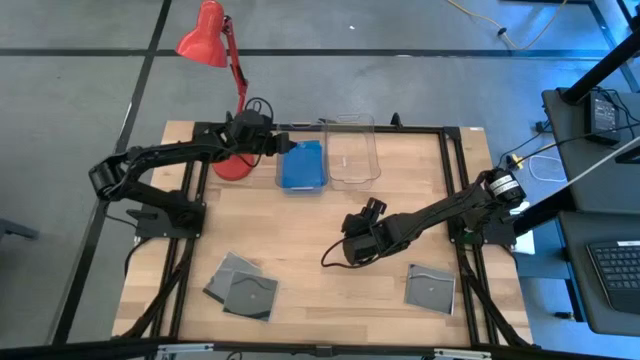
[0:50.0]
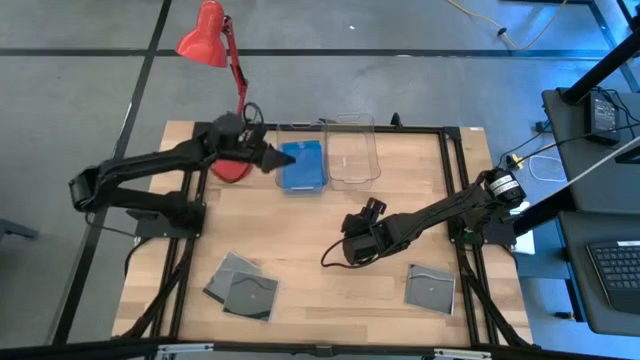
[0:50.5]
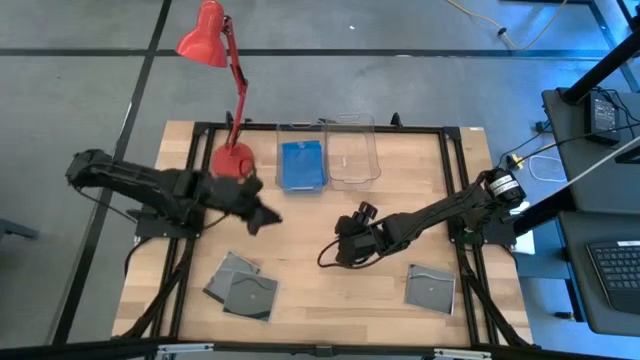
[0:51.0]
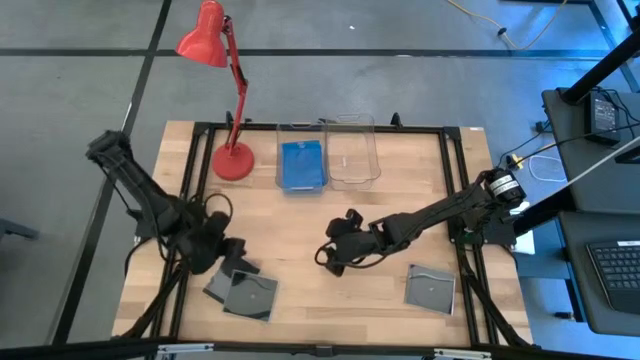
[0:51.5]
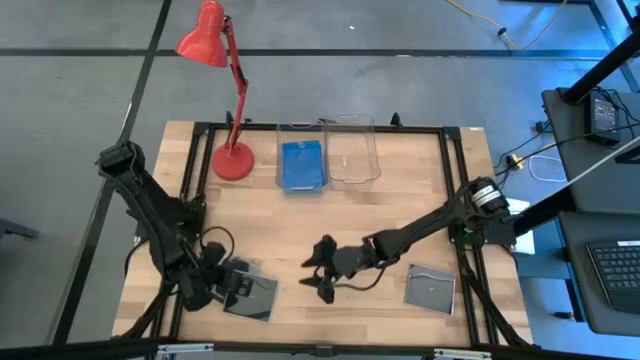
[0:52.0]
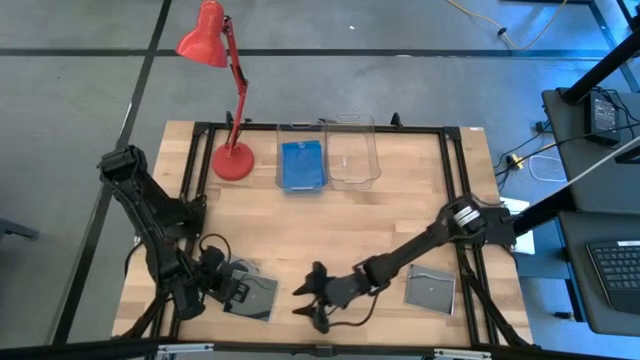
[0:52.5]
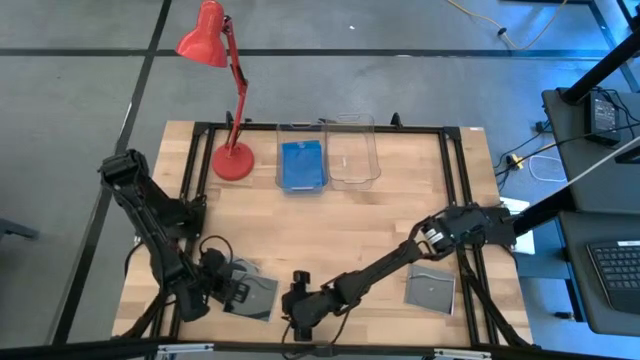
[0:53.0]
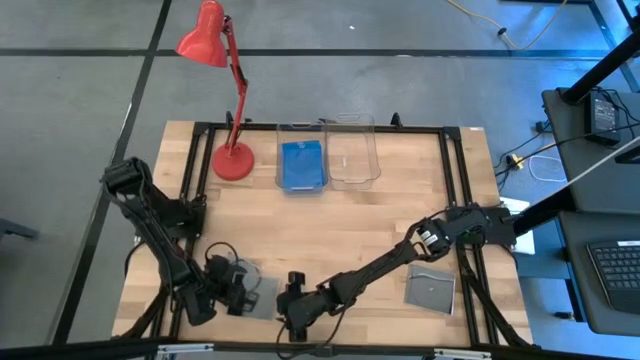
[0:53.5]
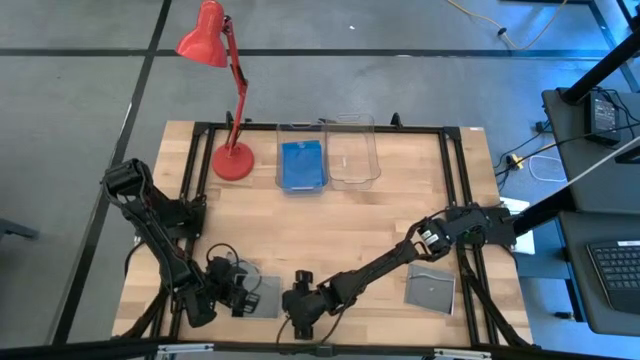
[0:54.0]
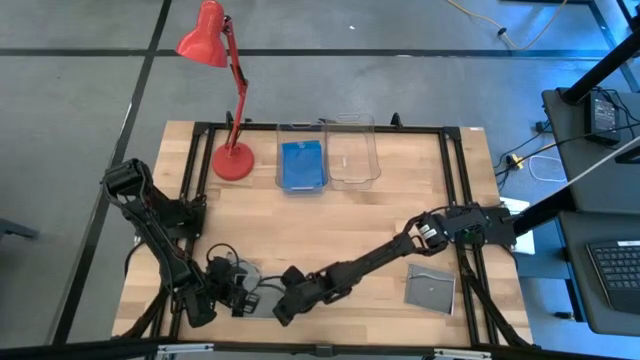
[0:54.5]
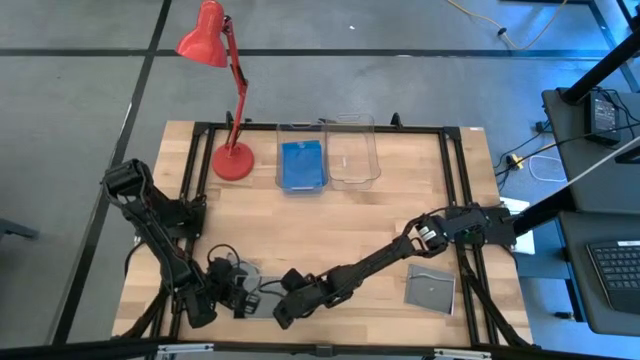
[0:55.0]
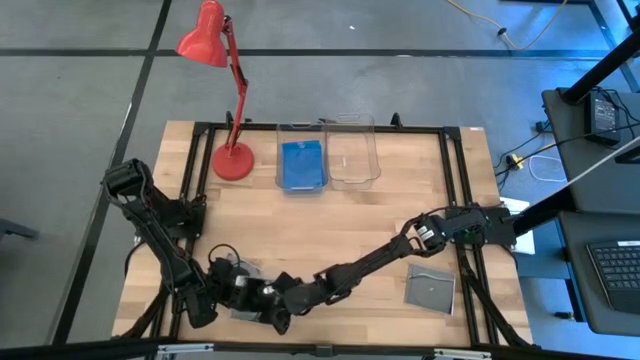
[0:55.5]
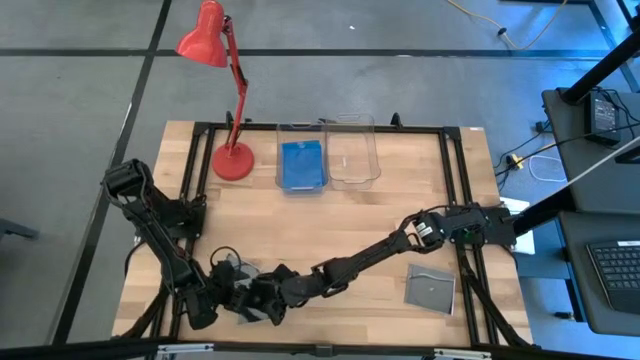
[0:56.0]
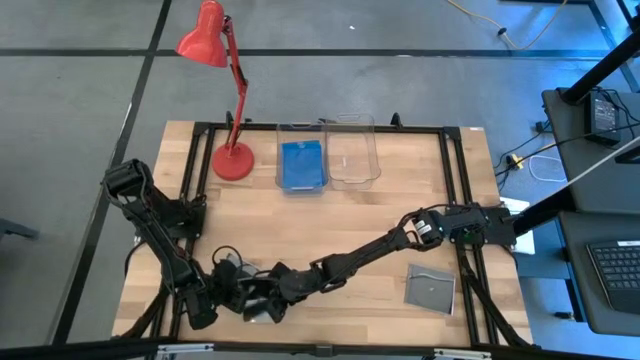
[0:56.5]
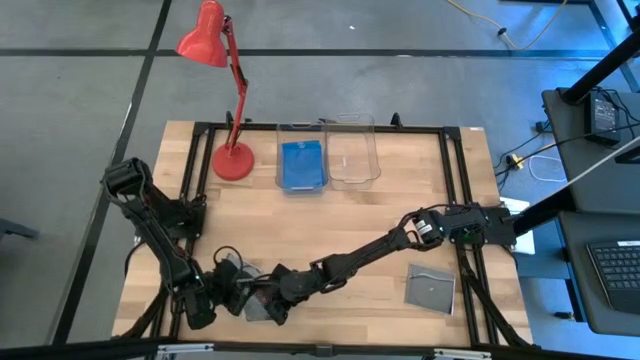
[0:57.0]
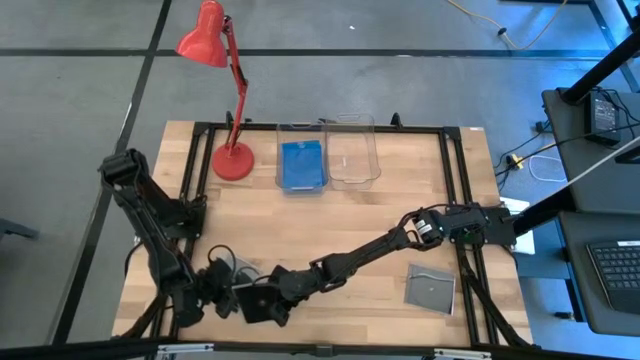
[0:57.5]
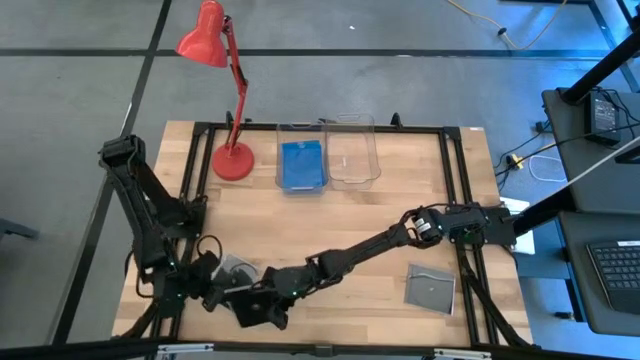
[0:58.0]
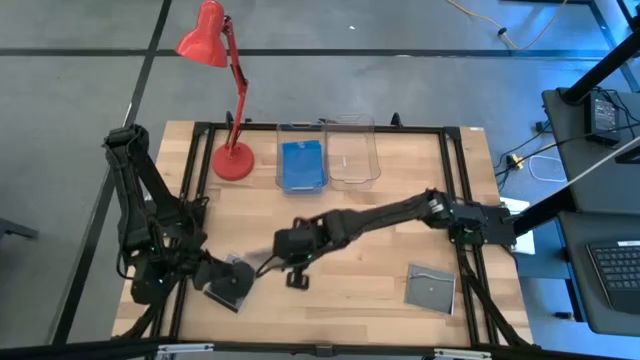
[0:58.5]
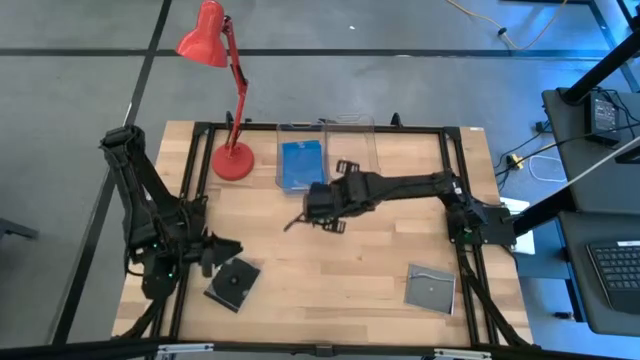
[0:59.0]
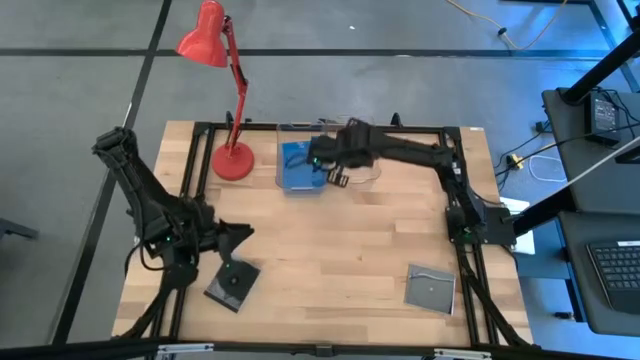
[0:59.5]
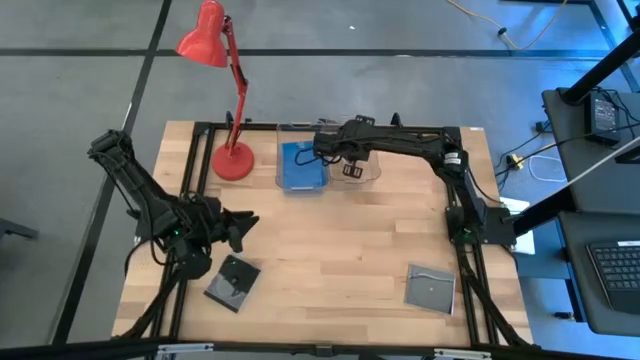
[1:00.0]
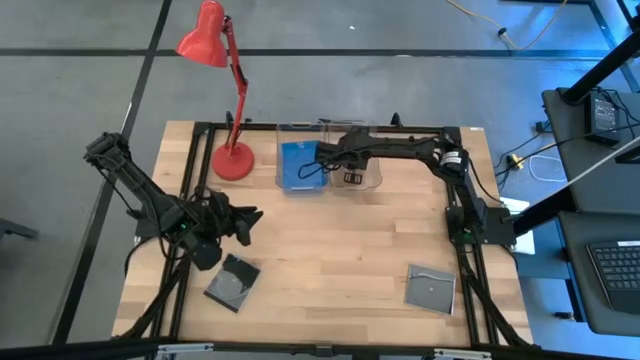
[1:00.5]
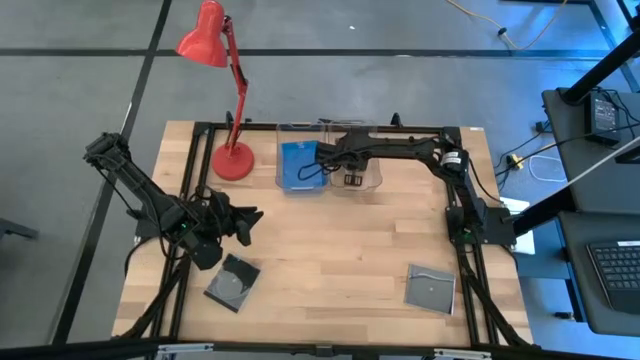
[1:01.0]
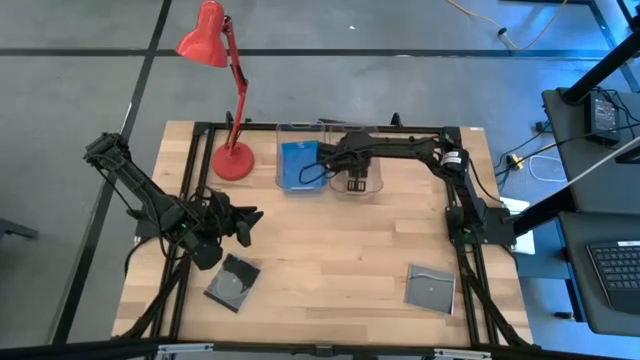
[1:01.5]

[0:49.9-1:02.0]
Task: Pick & place jewel cases by type
Put the middle black CD case into the right transparent bin

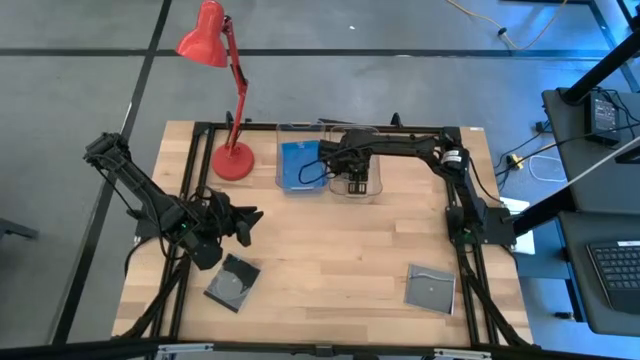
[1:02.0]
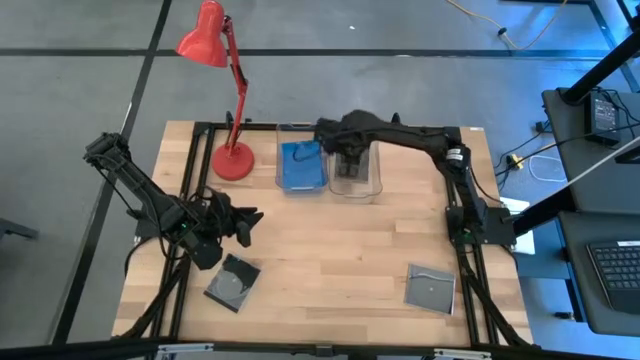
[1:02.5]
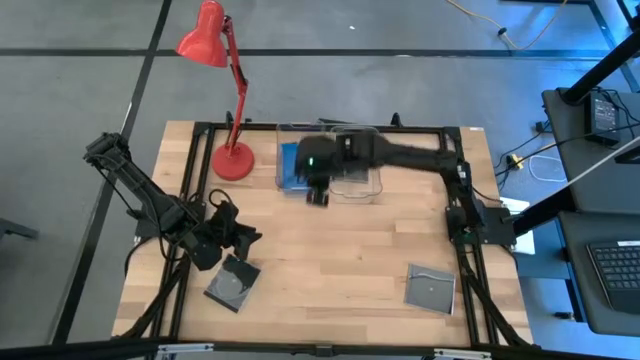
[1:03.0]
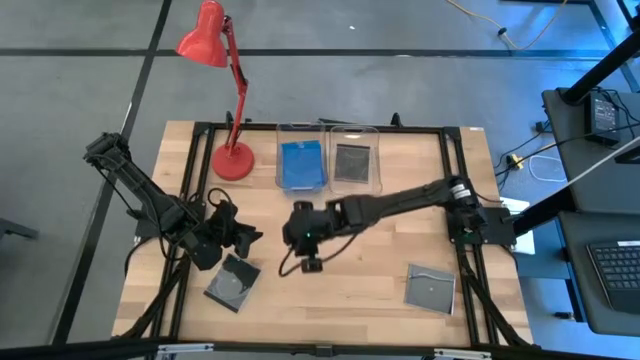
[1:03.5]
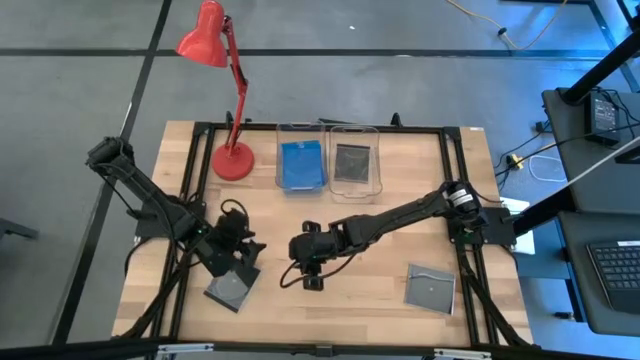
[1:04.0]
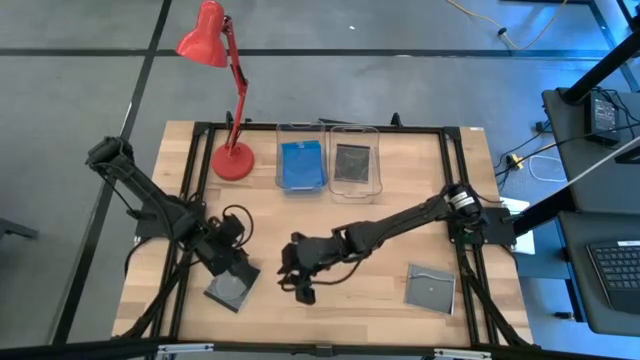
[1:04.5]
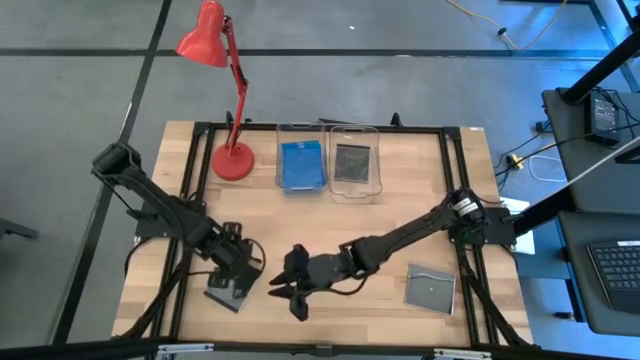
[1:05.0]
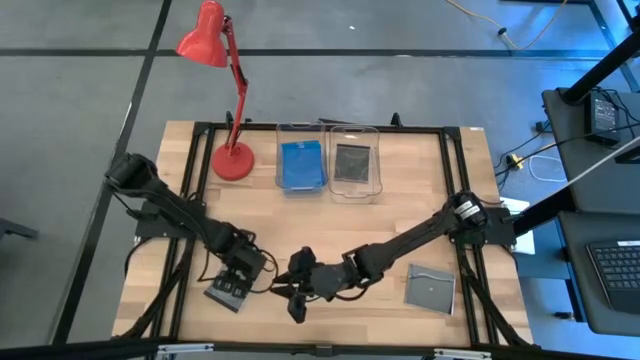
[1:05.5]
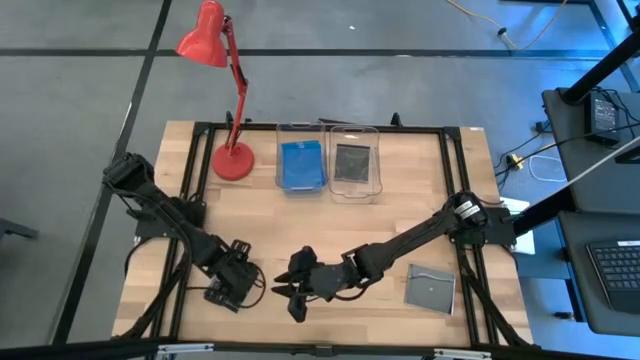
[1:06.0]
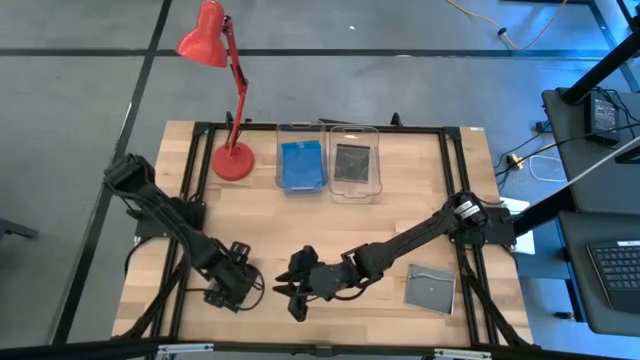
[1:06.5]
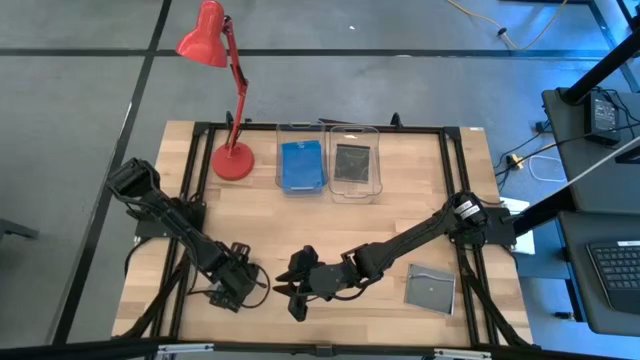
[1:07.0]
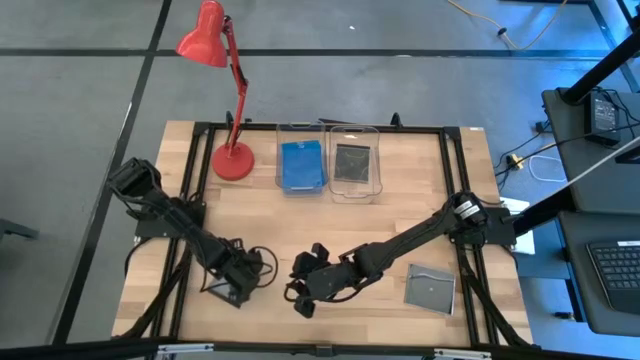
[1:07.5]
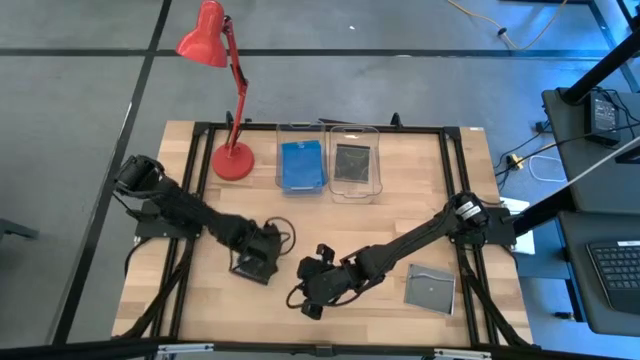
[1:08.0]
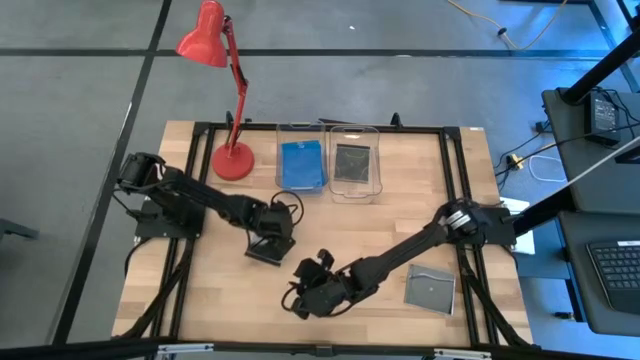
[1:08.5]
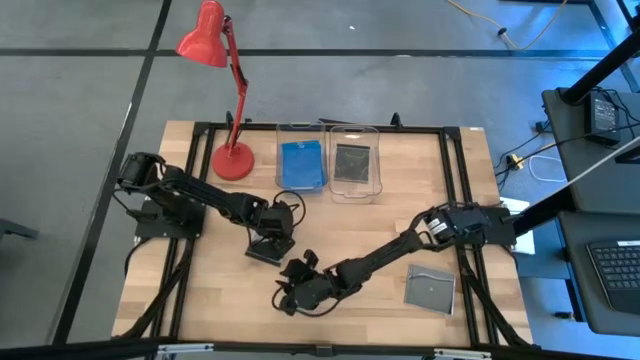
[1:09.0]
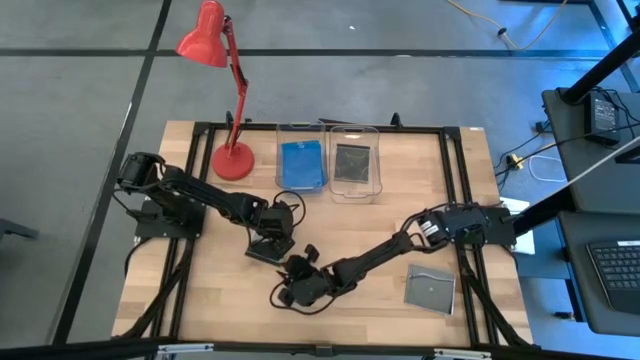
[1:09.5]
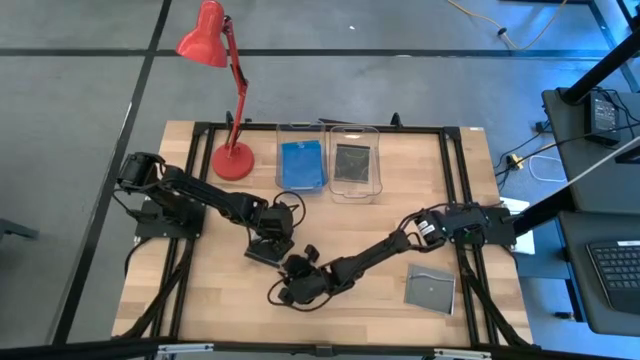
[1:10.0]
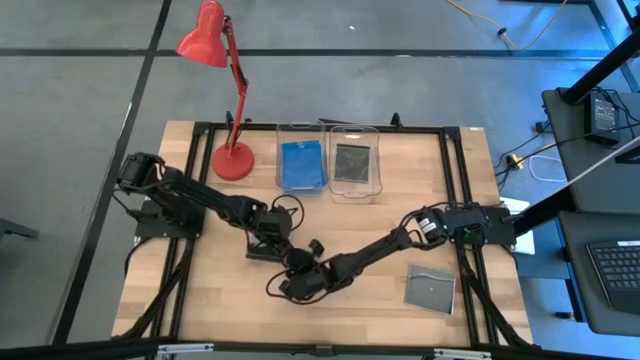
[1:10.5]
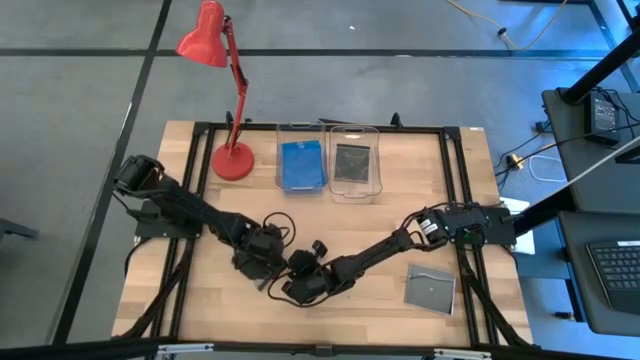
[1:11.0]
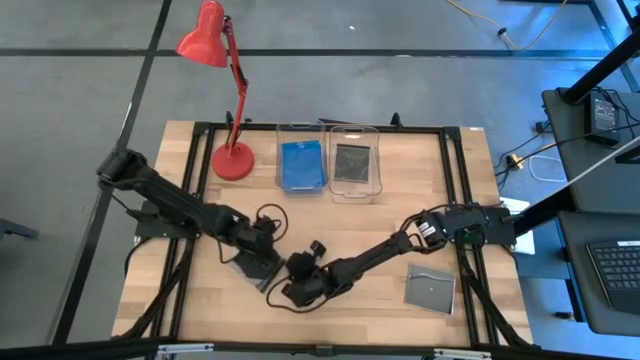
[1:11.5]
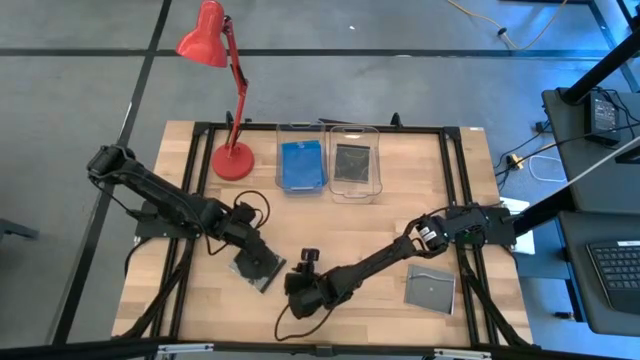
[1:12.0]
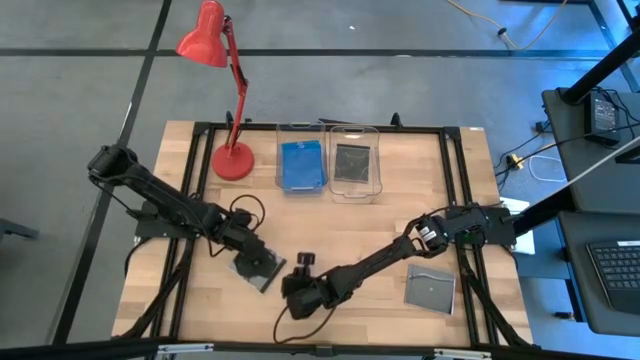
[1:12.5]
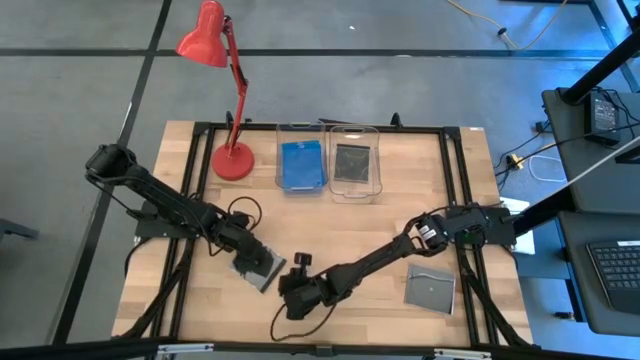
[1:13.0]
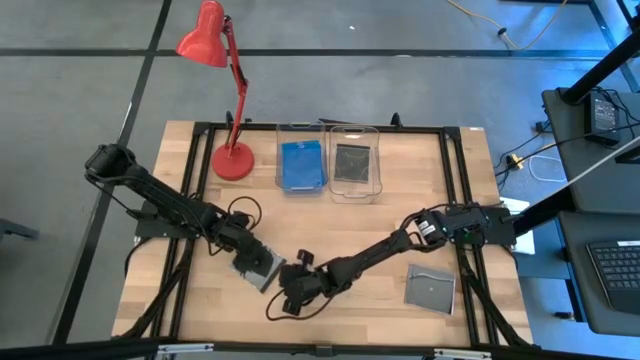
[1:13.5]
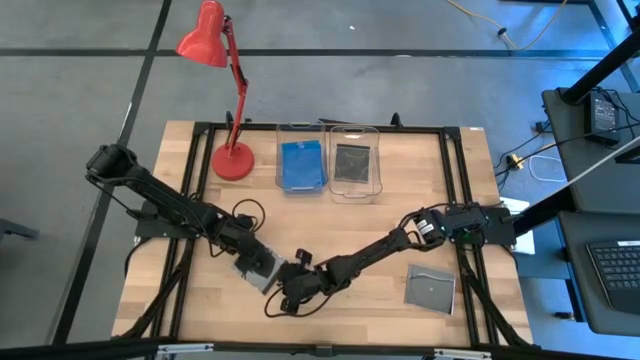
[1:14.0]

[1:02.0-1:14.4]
Put the left black CD case into the right transparent bin
